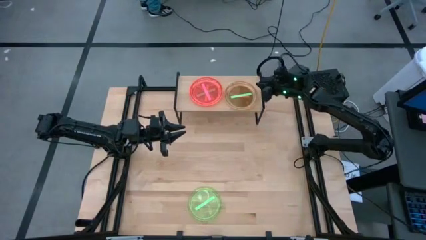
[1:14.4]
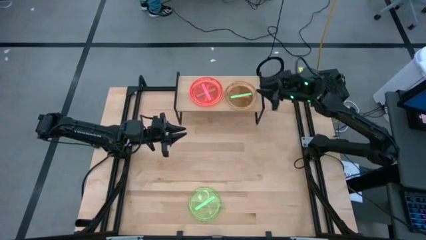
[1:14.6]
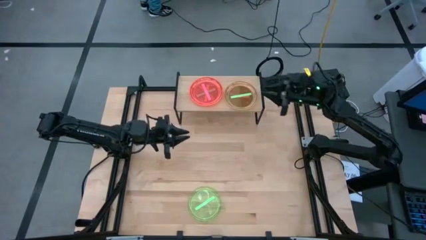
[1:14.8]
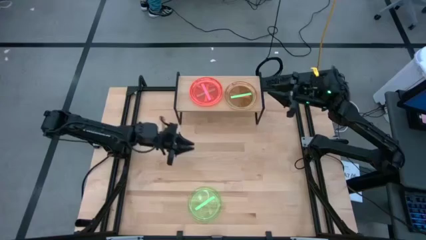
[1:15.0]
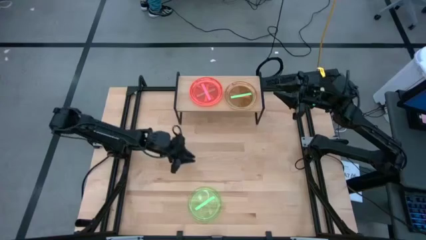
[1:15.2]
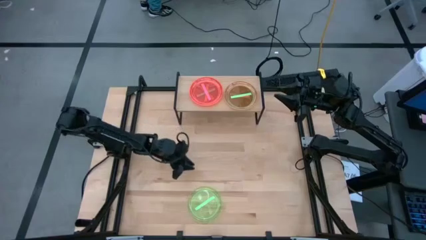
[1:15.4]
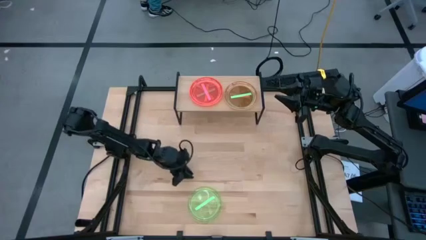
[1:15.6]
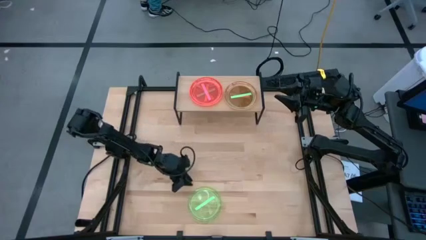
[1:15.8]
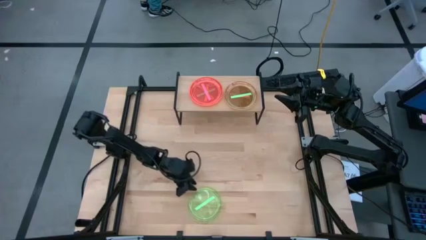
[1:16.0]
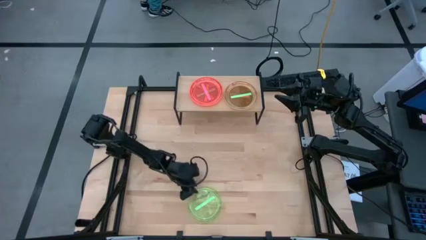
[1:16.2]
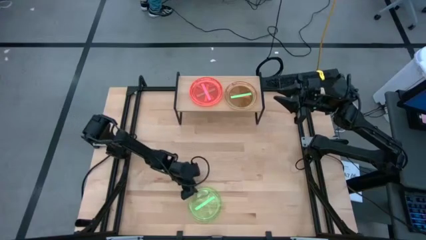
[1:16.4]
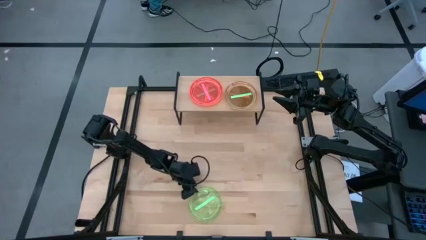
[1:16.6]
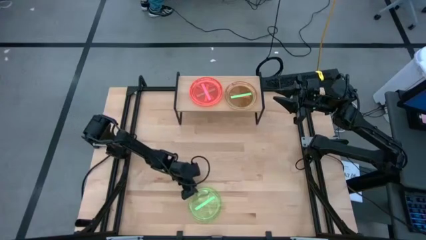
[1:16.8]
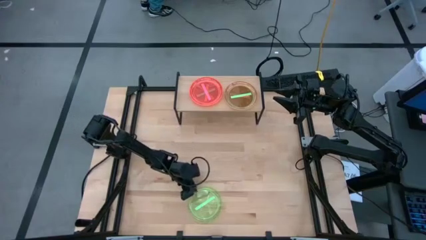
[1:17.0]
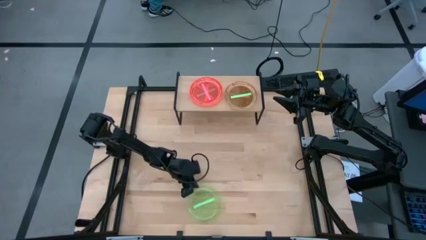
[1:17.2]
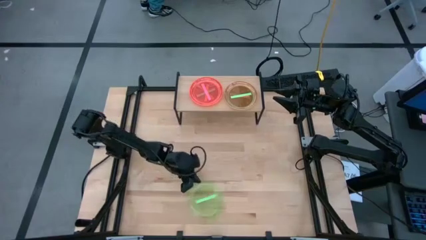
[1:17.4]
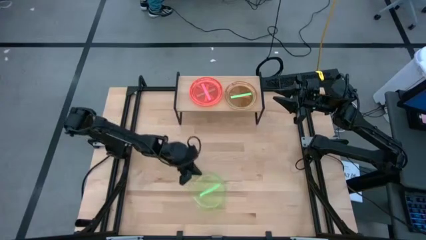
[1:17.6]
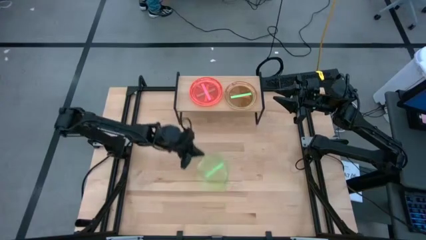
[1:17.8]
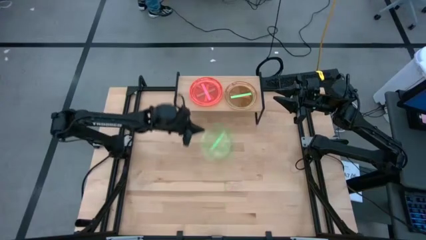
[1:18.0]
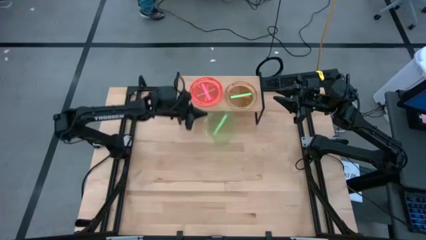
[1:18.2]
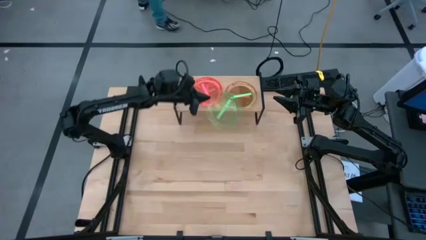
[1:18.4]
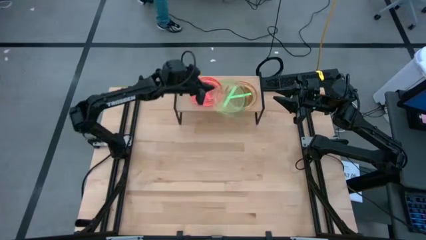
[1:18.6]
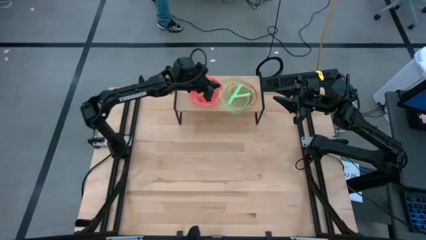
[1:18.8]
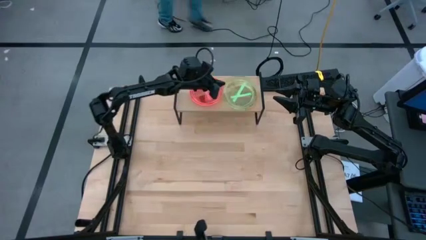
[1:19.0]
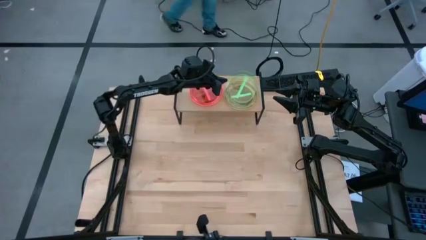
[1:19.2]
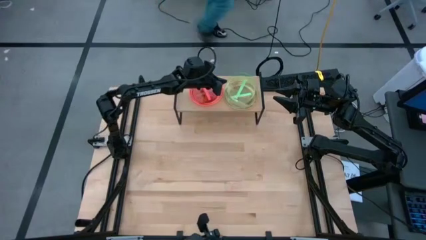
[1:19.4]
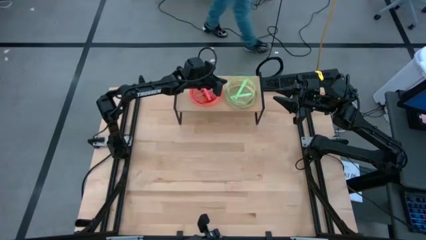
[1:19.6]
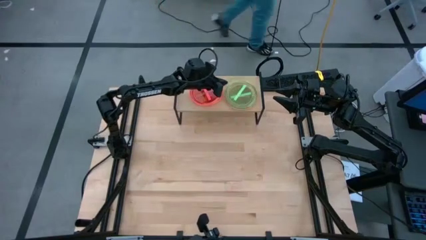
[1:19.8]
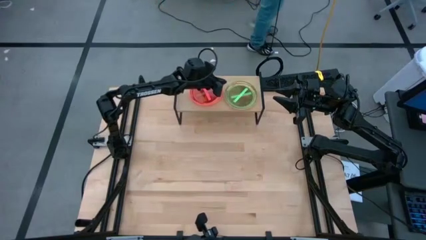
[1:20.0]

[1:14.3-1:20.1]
Task: Place and stack plates onto a shelf
Stack the green plate on top of the green plate

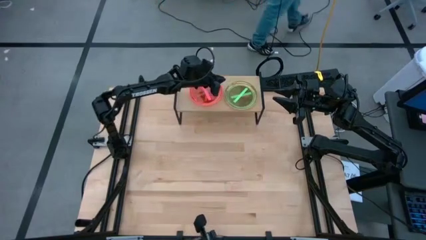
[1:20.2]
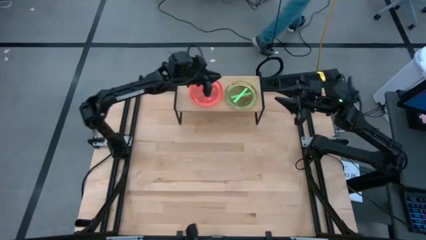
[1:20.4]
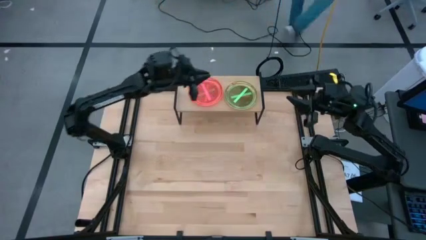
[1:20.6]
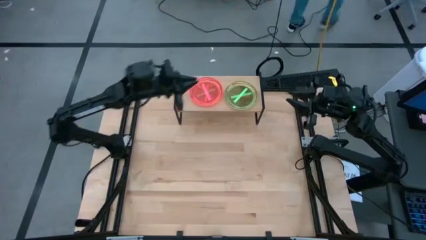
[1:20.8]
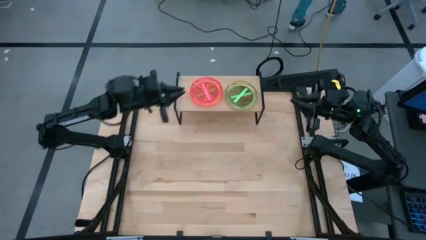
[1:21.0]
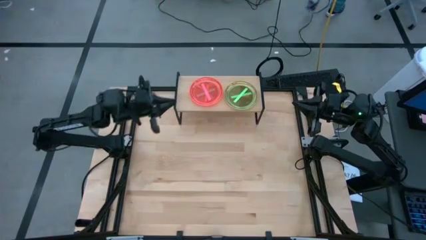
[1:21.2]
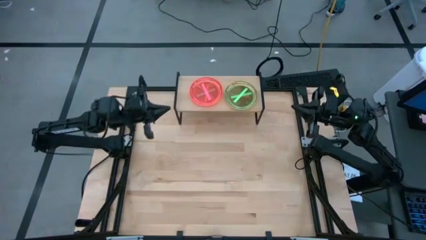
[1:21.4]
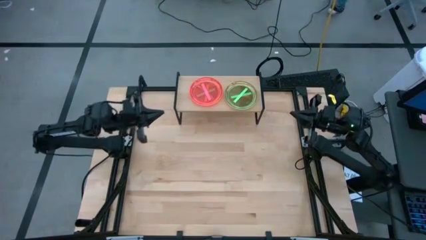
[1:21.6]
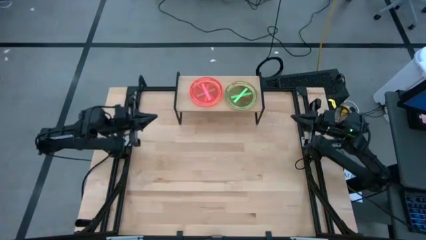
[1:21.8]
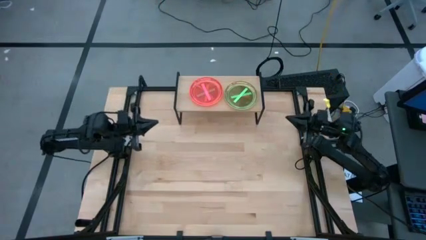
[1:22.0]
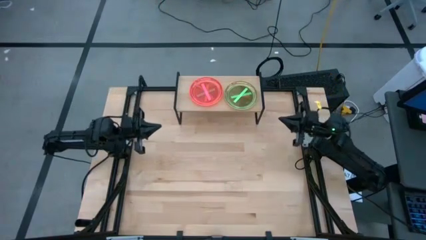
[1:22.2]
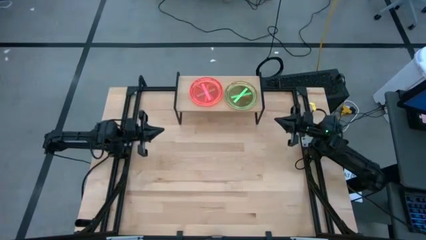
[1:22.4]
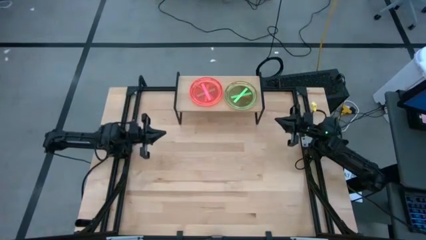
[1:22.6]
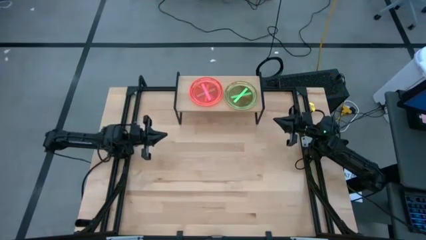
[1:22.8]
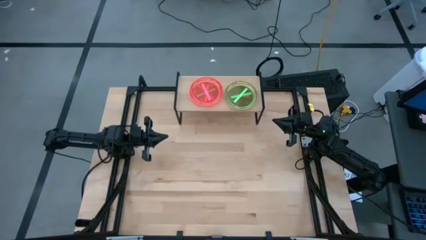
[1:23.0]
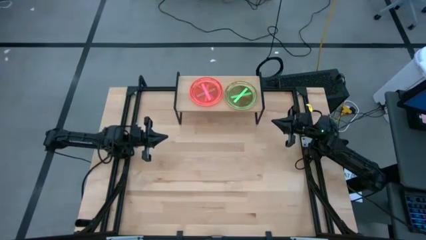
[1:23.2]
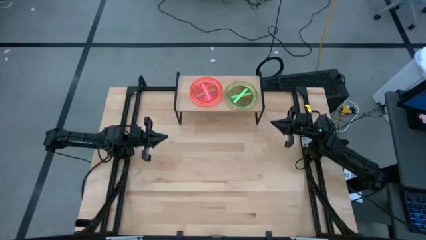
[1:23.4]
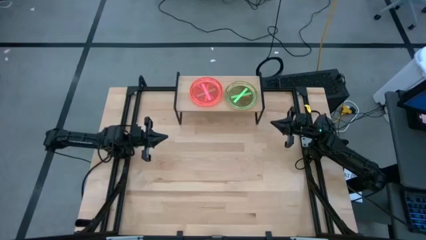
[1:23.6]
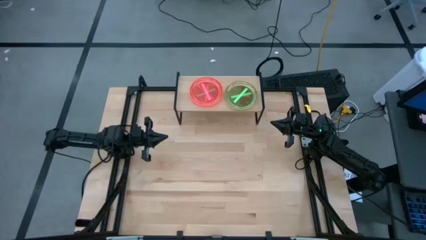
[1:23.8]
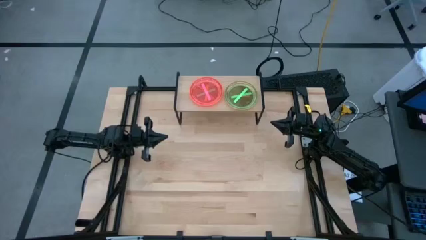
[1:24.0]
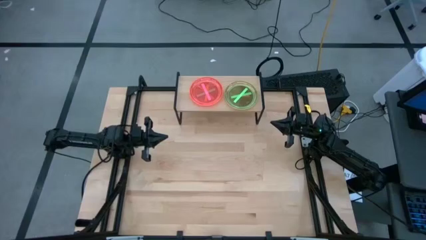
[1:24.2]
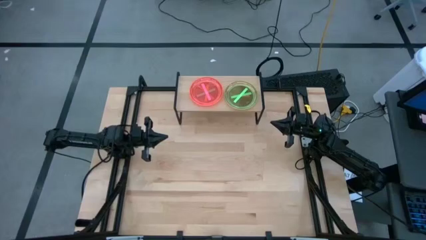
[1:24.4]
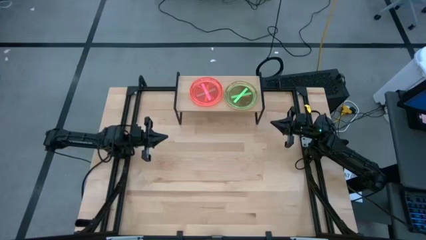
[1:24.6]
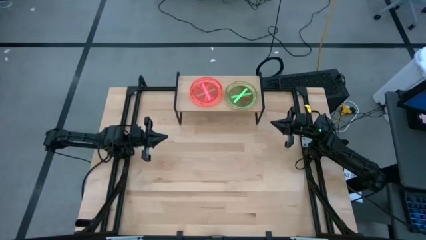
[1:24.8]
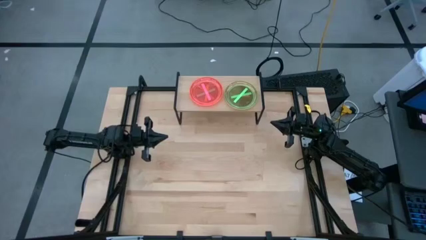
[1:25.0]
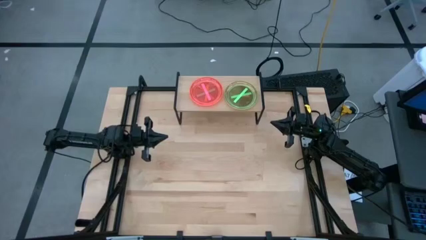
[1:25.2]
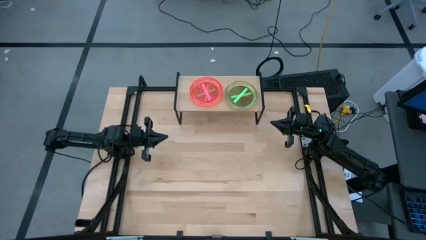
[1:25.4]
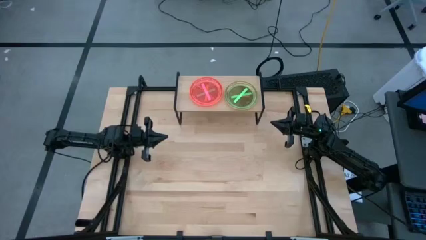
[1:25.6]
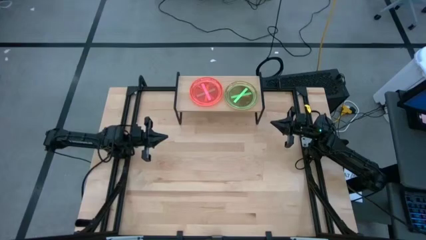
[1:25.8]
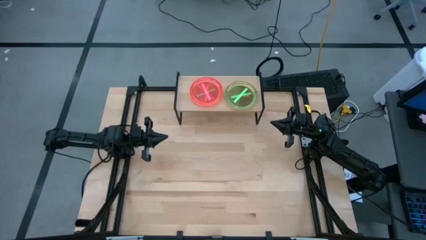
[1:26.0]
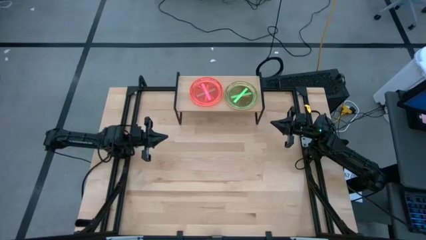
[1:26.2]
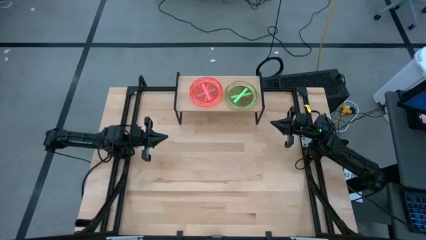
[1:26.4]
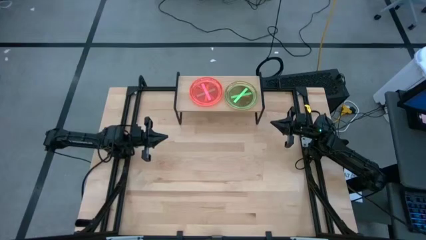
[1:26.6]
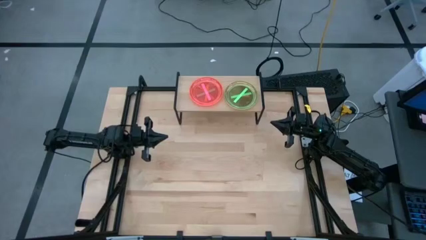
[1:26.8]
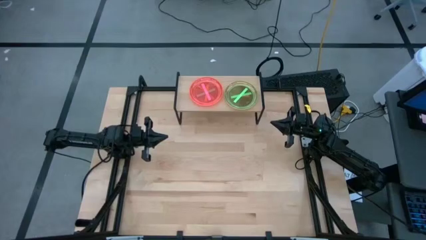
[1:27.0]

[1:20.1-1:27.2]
Return to Home Position

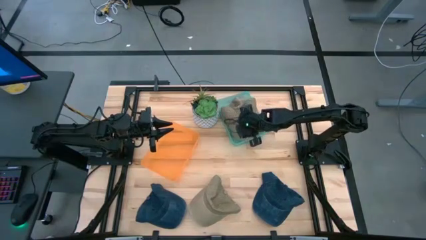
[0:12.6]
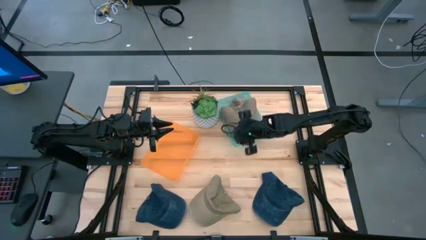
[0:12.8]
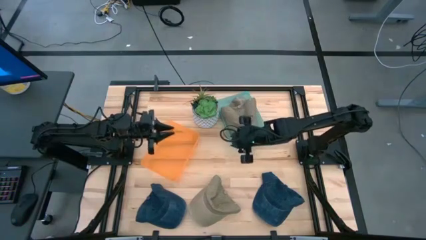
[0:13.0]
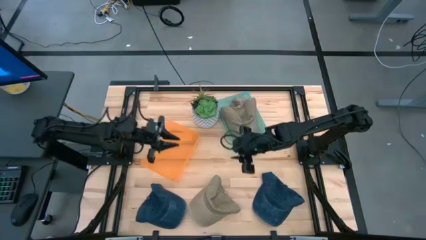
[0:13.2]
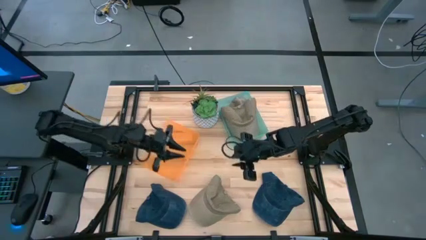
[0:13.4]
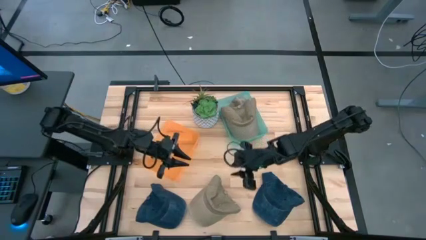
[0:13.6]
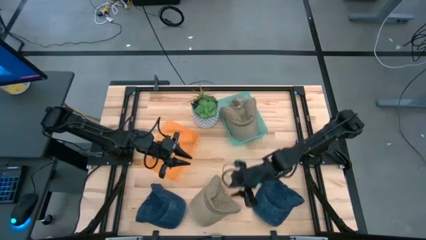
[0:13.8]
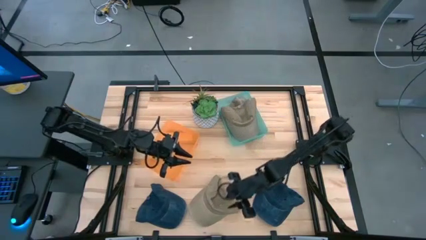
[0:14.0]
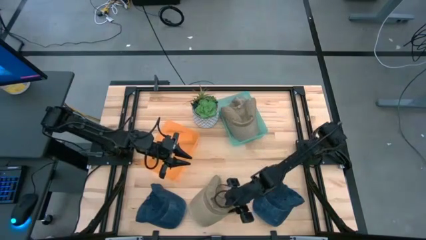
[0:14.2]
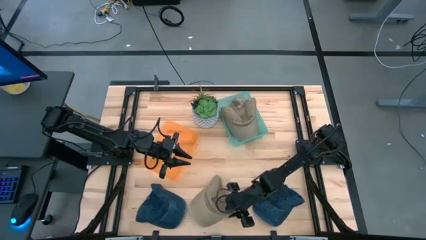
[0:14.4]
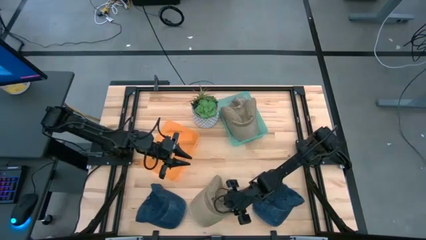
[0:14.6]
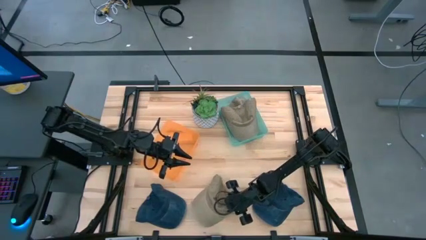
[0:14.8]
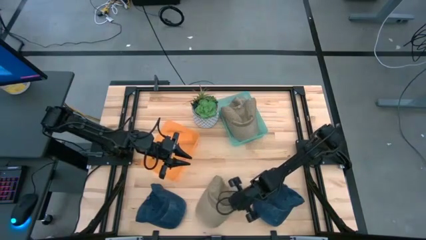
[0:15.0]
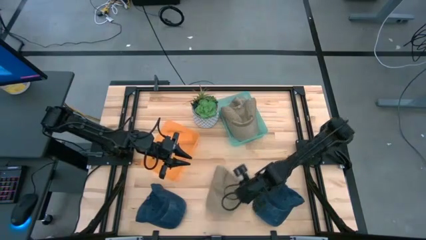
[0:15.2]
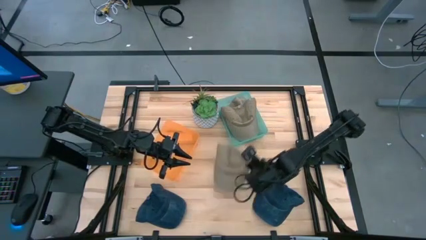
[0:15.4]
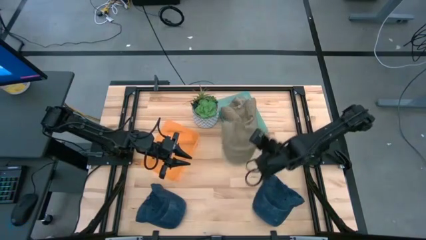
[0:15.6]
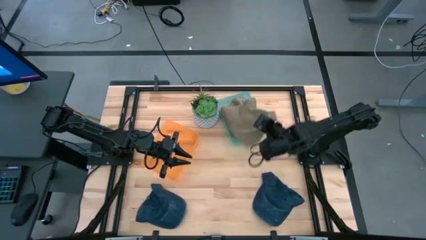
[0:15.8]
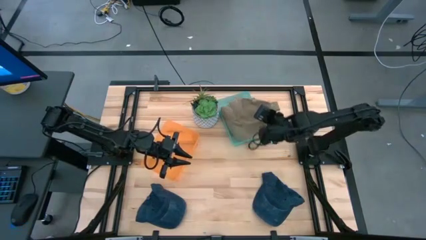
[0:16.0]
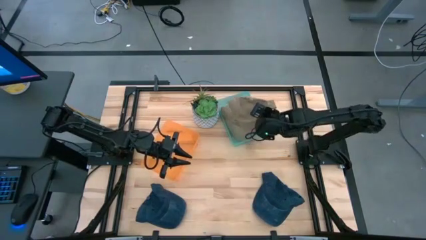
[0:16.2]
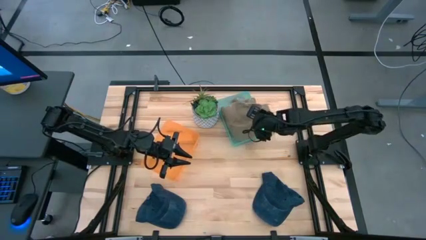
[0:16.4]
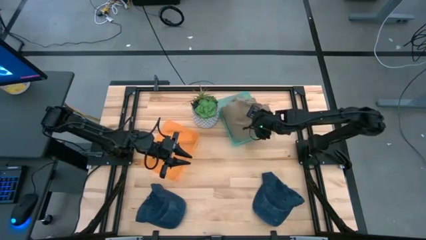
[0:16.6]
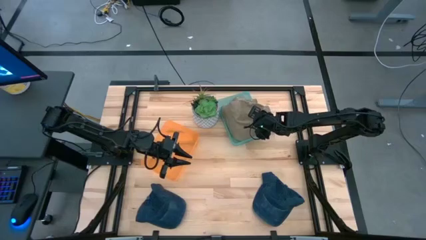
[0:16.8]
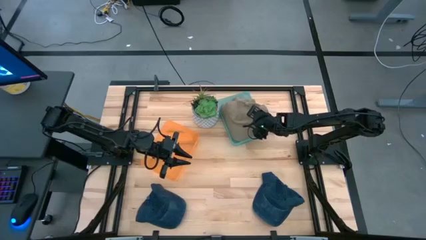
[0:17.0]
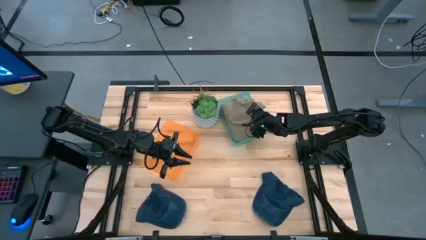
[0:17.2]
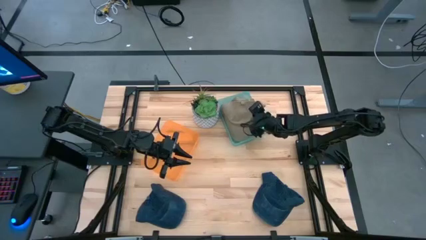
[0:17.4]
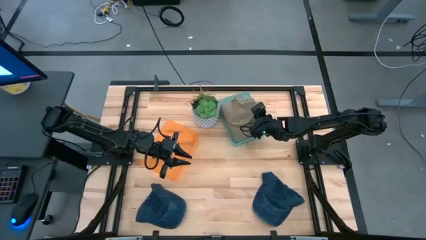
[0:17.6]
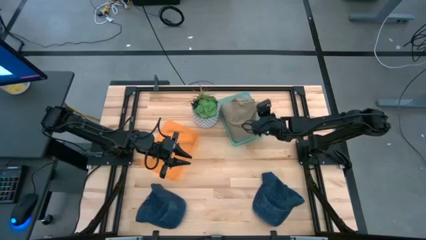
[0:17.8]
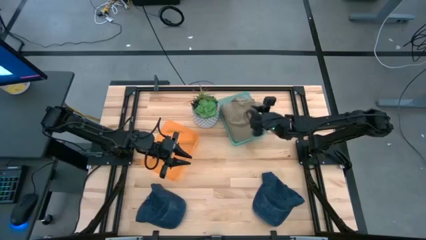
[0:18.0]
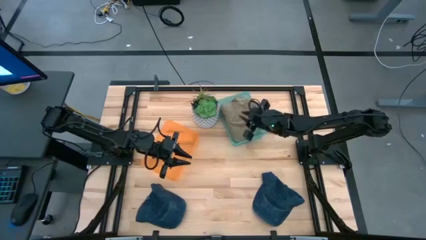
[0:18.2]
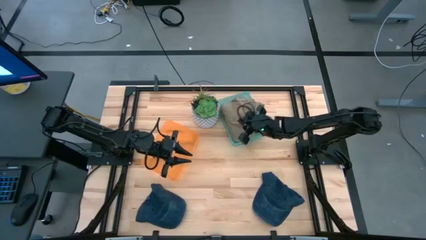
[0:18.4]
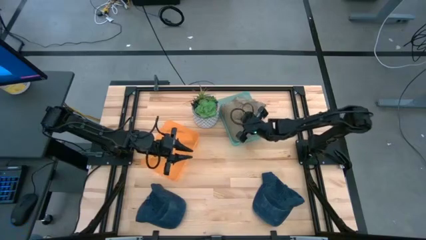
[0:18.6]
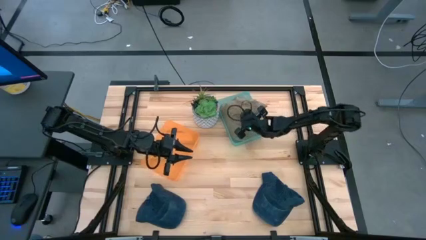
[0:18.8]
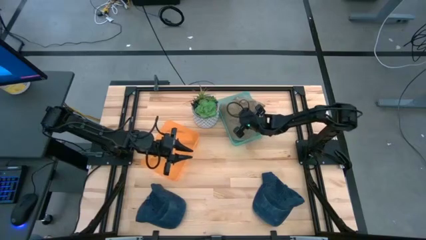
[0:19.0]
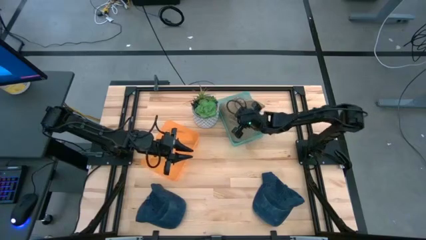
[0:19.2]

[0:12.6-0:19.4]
Task: Pick & Place hat
Put the brown cap into the blue bin
